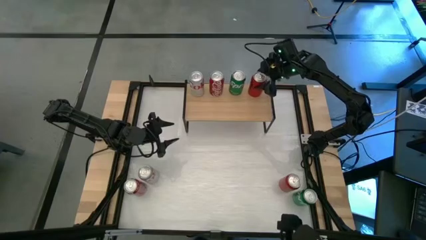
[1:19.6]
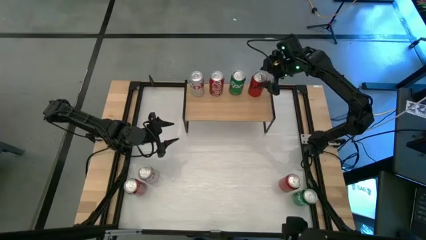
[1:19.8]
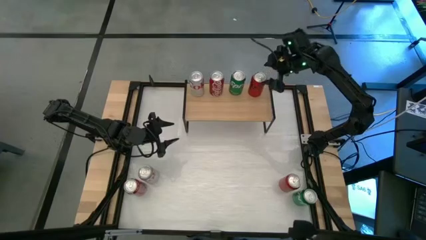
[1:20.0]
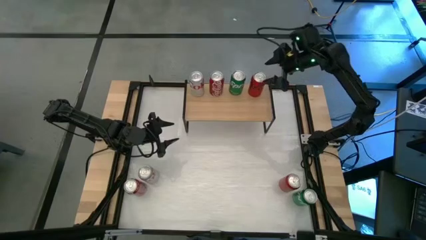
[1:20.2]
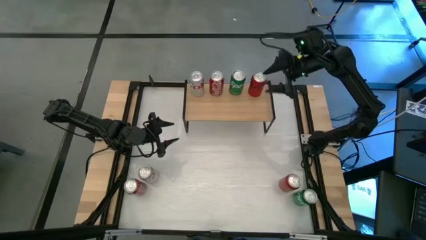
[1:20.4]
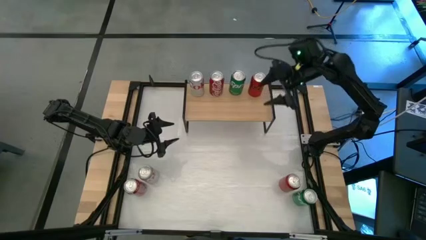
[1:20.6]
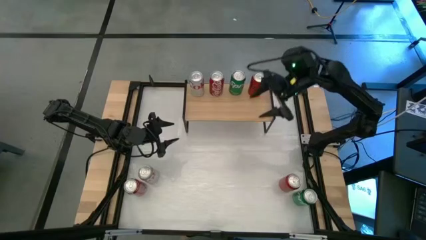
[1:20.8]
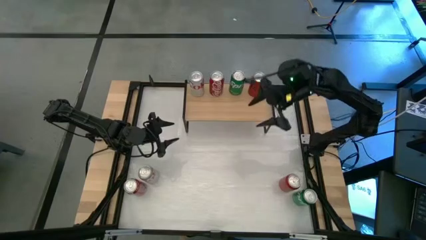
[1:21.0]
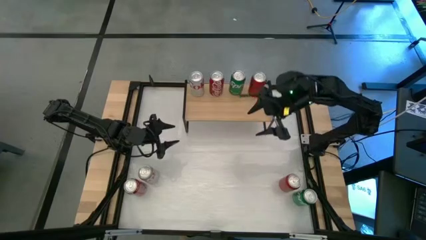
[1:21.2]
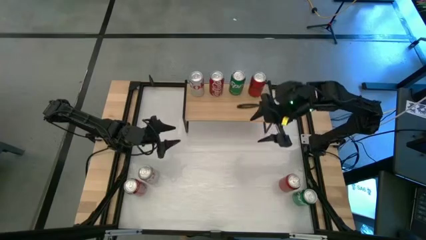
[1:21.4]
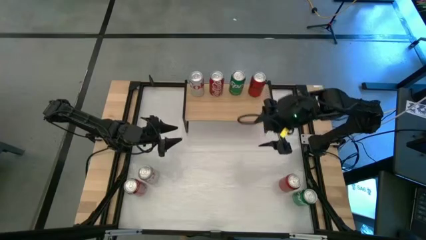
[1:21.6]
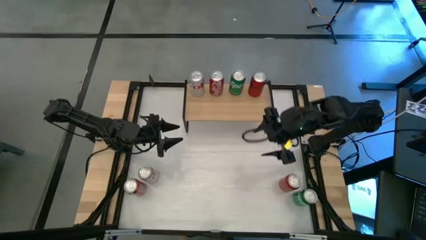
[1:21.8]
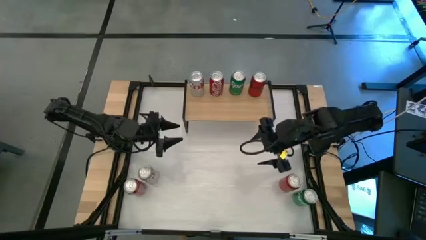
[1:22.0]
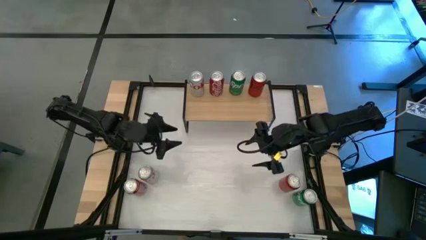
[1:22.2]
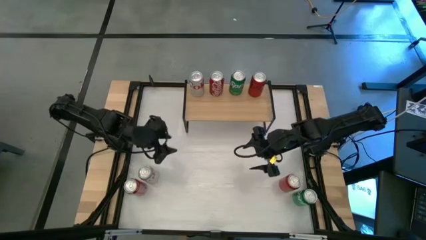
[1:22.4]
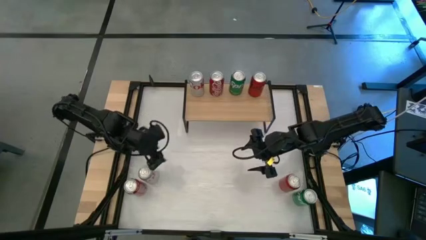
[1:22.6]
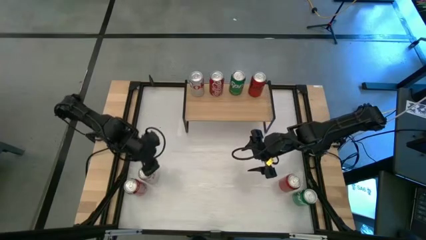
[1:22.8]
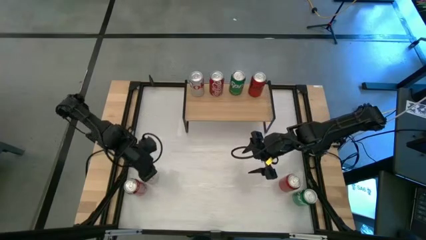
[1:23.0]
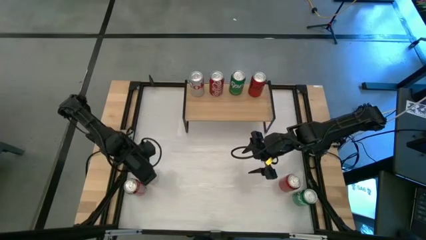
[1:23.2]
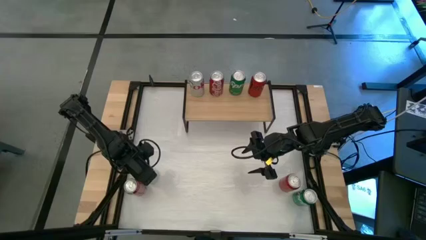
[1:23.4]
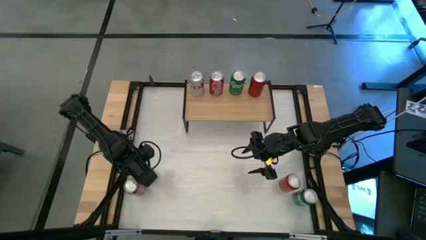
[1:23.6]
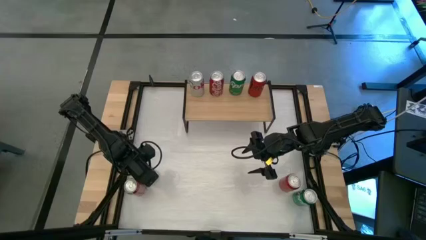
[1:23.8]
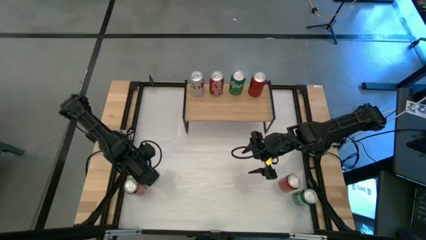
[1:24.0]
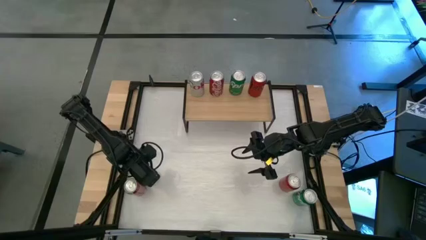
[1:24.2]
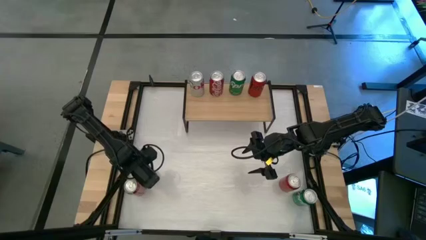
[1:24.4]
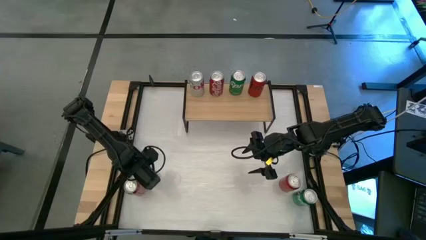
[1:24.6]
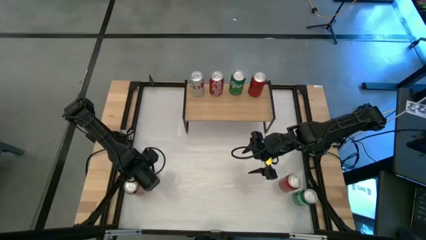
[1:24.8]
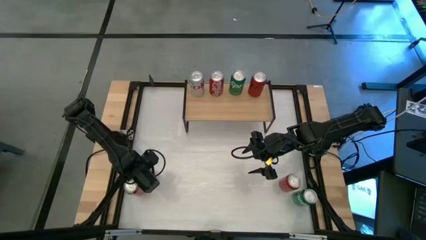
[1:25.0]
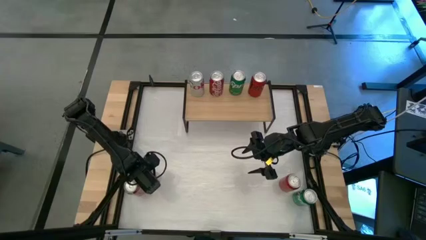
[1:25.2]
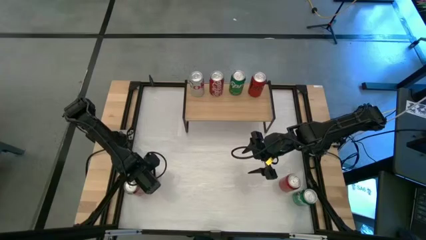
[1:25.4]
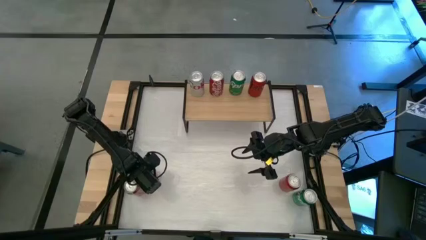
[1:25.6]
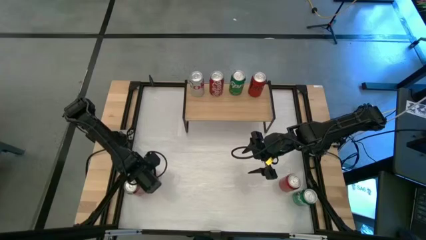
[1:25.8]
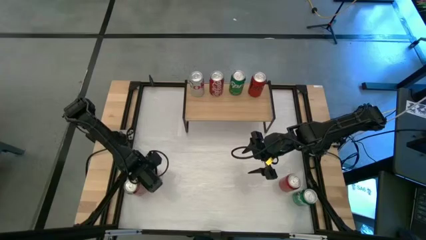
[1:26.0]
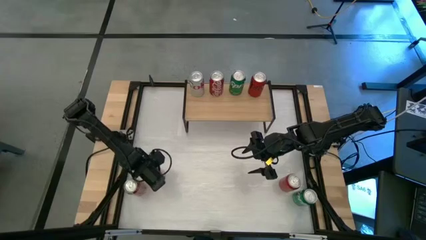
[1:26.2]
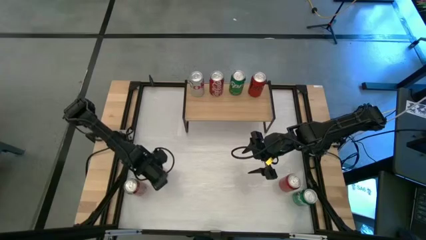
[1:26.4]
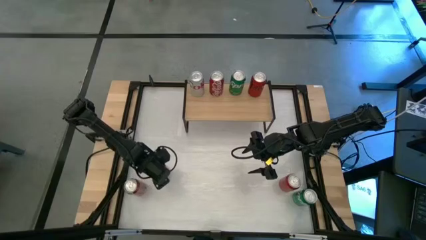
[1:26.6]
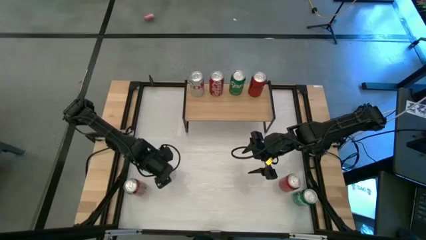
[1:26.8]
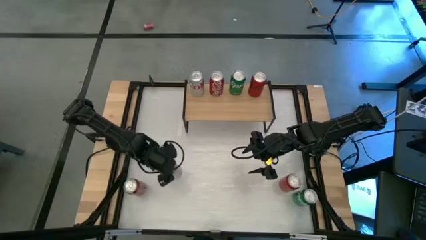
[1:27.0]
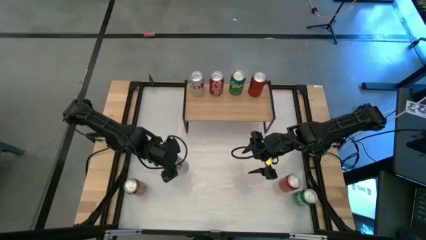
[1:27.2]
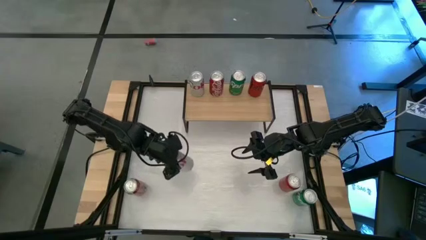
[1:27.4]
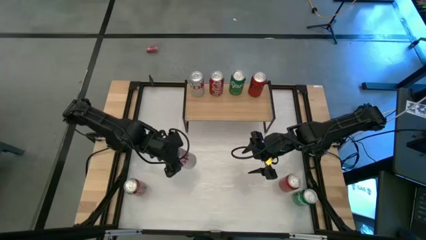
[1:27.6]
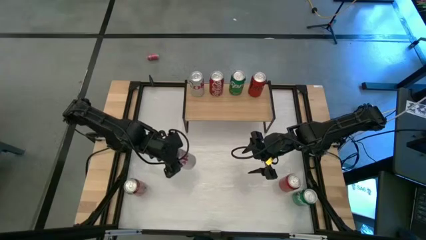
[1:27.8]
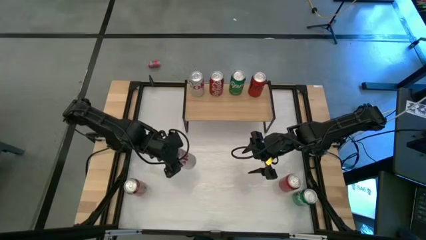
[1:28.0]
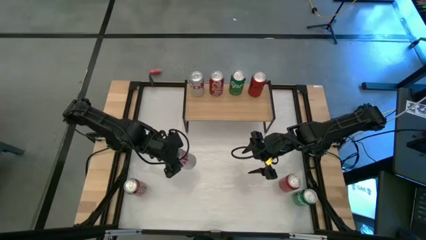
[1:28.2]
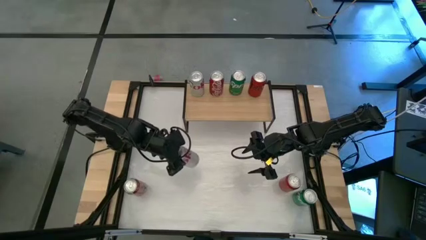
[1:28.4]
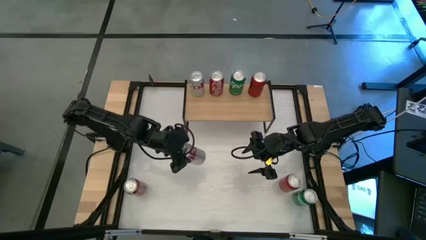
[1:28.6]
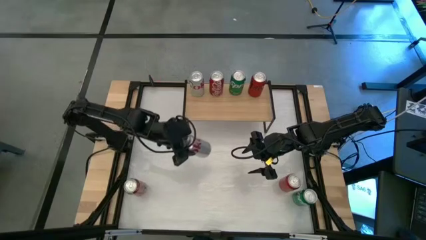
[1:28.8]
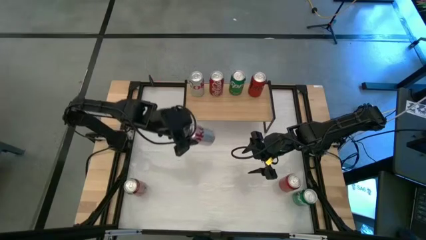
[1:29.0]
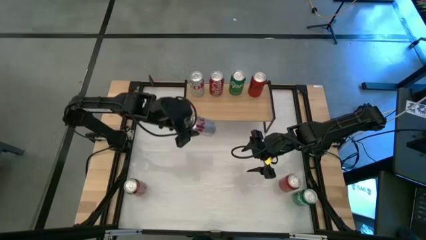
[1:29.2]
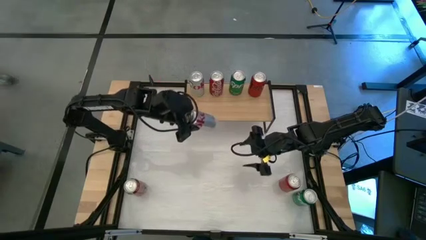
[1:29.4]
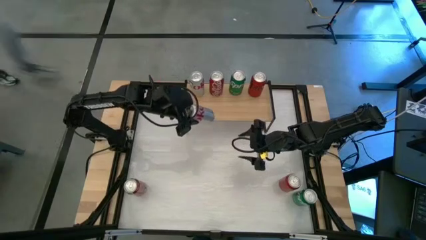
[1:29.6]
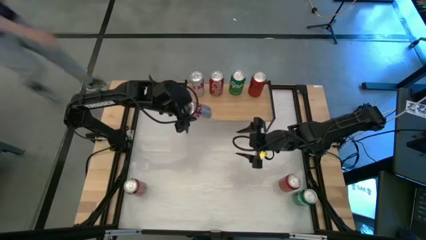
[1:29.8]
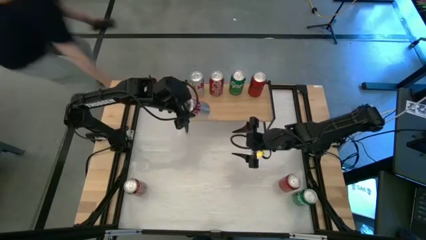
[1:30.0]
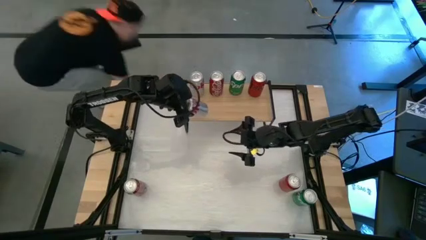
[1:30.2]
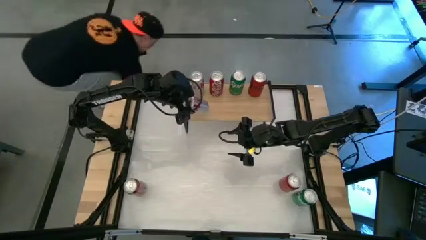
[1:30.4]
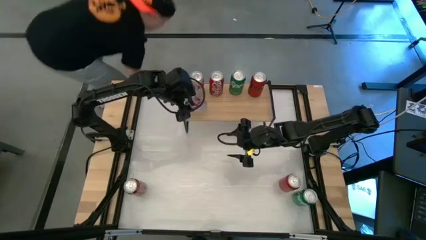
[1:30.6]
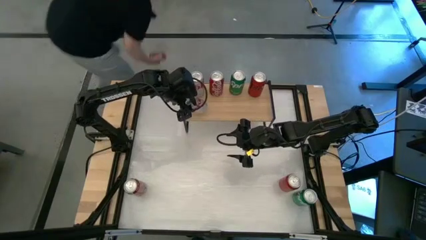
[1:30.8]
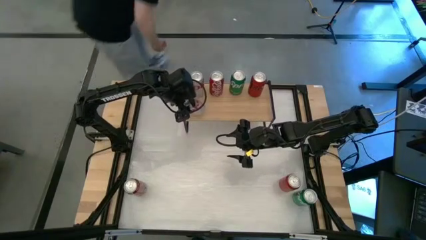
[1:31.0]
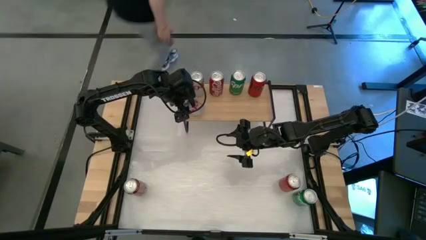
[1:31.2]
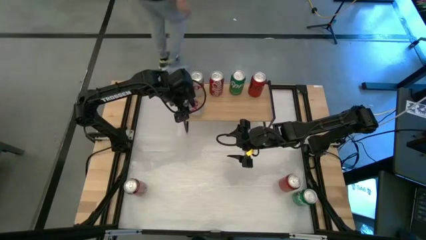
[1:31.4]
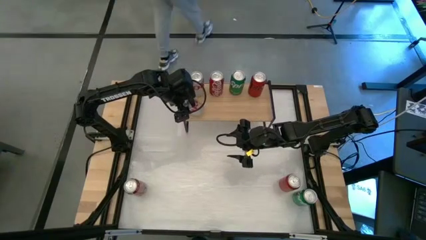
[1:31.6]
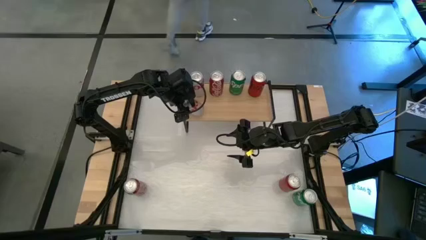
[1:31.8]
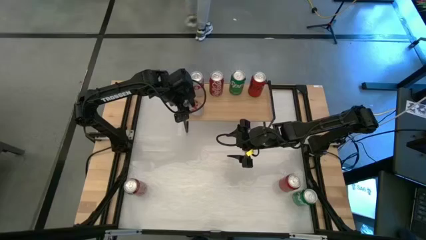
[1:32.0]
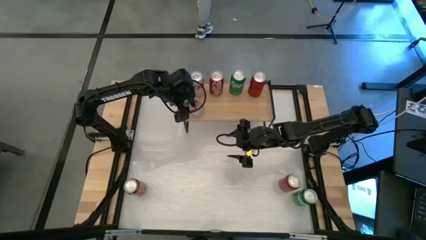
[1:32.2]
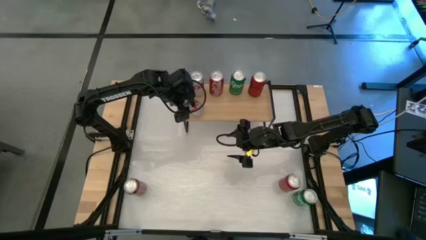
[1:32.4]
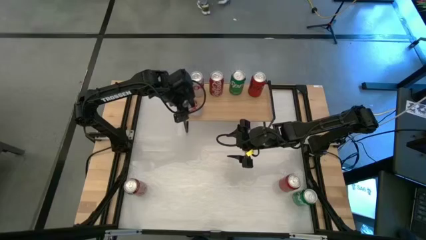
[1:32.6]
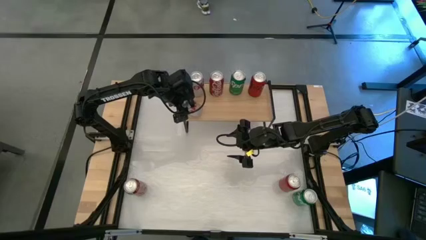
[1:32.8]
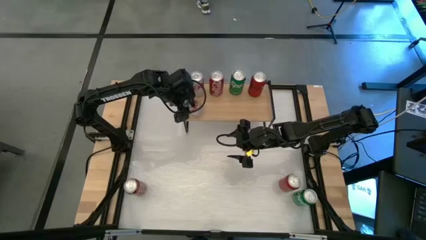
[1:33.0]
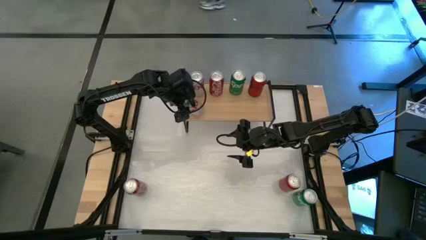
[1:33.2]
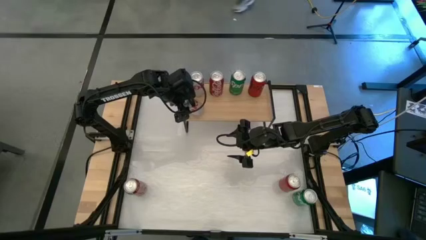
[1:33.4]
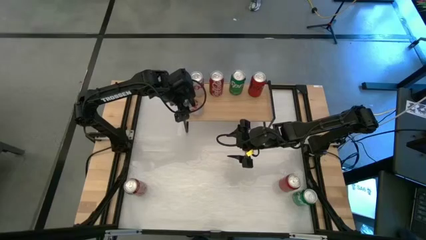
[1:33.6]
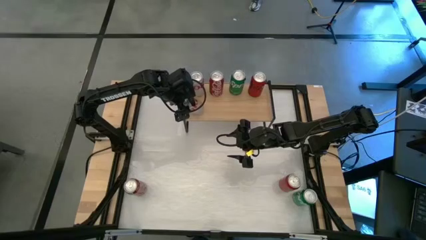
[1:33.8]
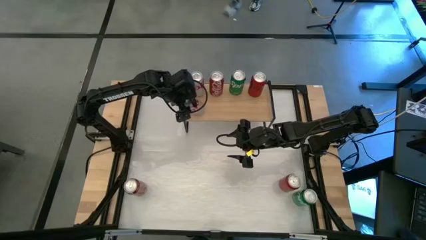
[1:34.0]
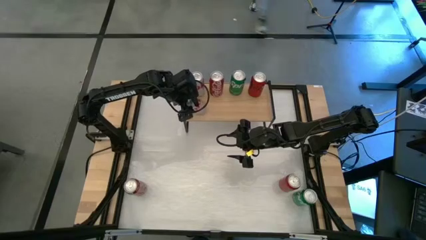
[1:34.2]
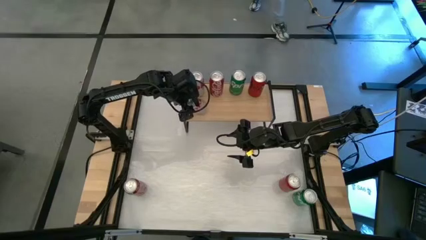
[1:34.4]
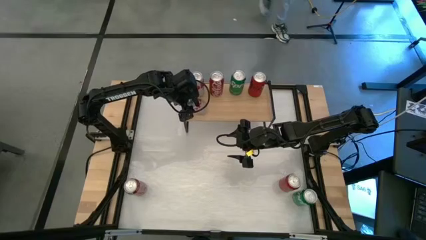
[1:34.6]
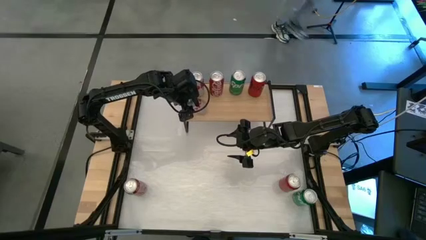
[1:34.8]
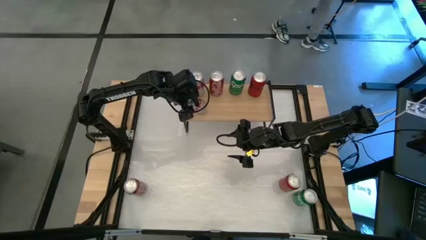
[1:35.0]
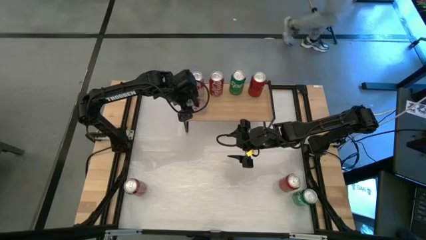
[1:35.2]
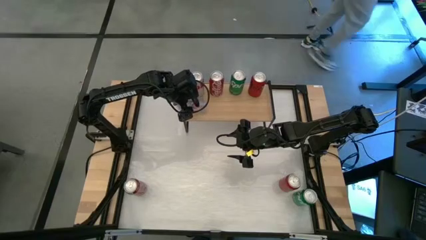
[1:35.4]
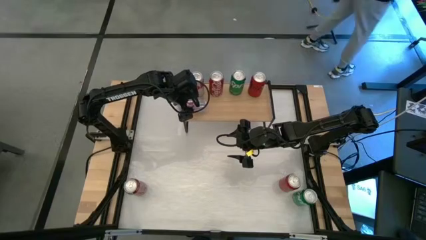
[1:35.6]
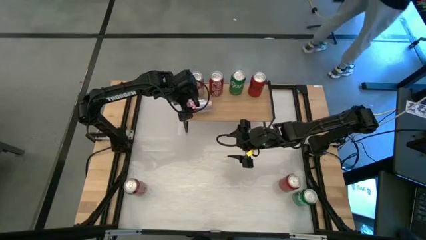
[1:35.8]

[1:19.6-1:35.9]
Task: Place canned beverage on shelf
Put the red-silver soda can aligned with the other red-silver soda can on the shelf

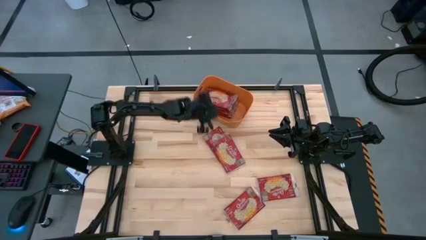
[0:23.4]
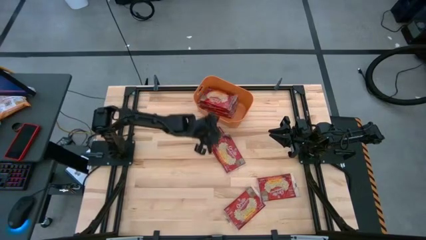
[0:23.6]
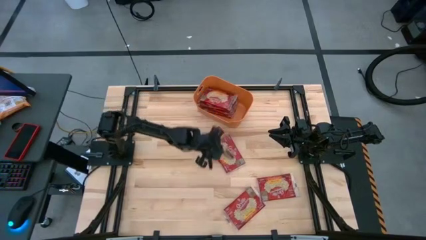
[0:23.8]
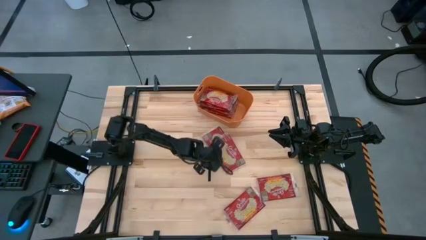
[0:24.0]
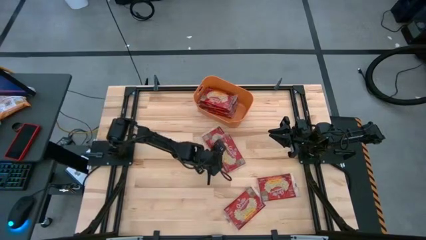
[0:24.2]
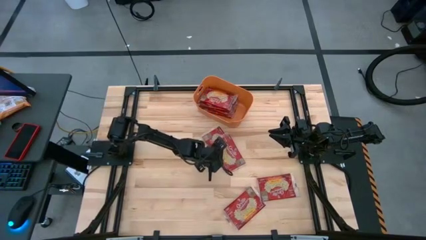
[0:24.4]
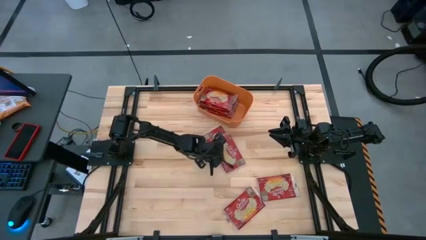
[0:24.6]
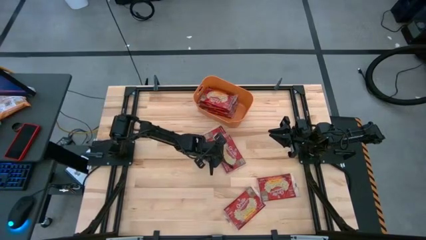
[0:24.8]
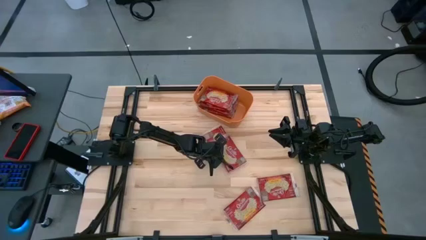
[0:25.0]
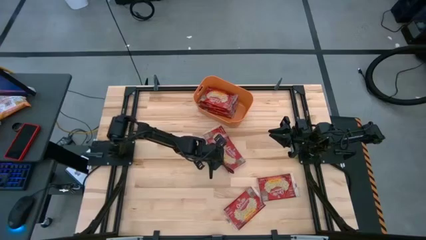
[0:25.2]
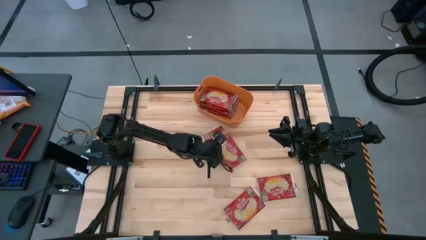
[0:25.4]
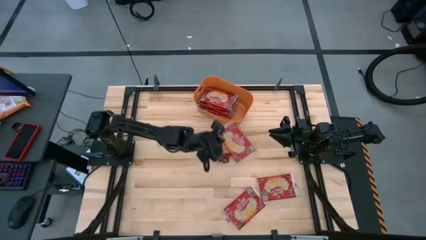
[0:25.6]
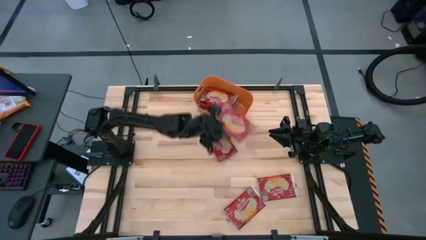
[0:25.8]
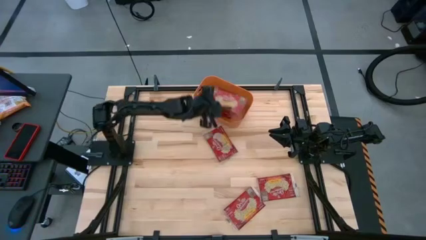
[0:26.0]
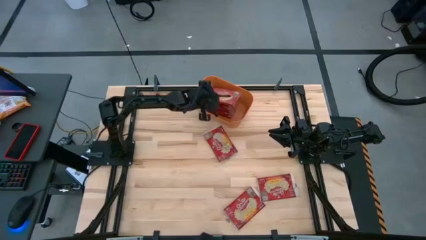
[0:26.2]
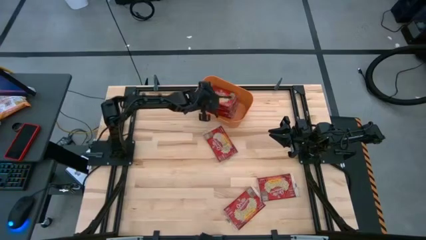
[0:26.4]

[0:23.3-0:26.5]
Task: Sort popcorn bags into baskets
Put the red popcorn pack into the orange bin
